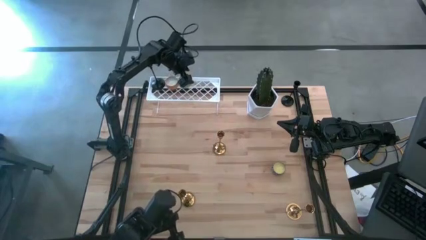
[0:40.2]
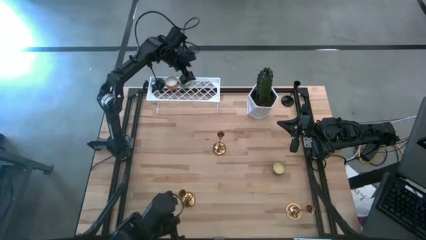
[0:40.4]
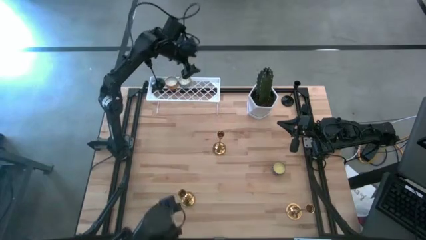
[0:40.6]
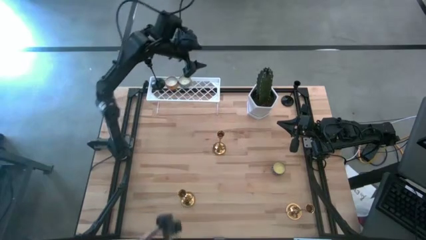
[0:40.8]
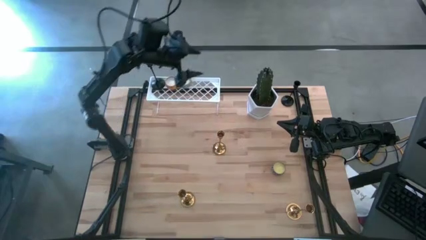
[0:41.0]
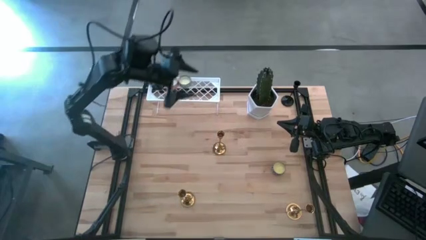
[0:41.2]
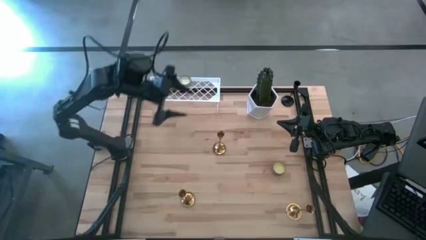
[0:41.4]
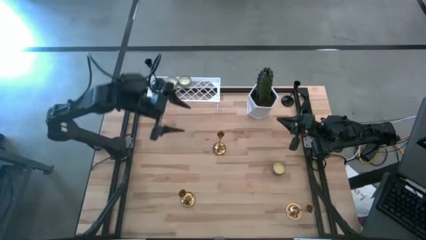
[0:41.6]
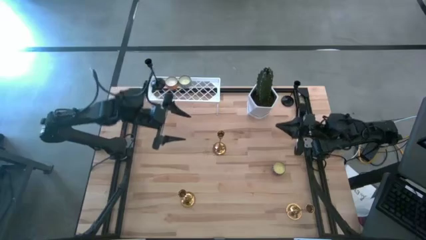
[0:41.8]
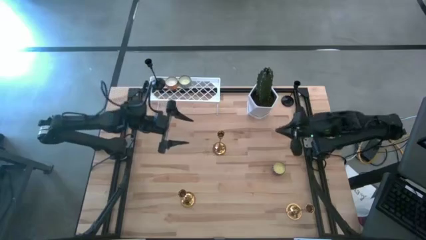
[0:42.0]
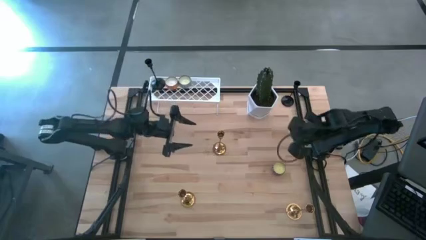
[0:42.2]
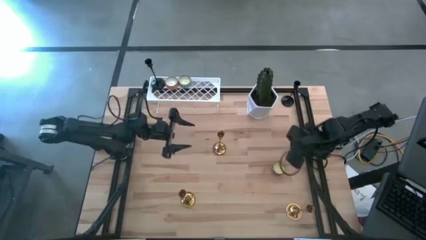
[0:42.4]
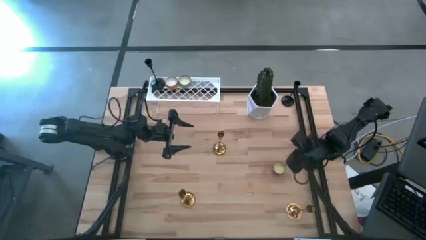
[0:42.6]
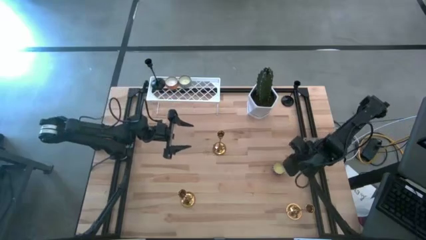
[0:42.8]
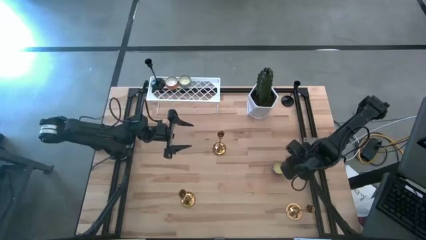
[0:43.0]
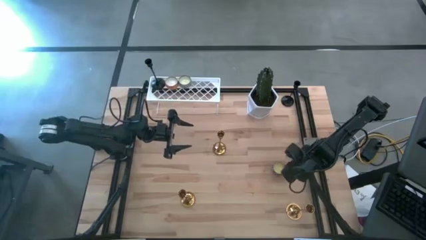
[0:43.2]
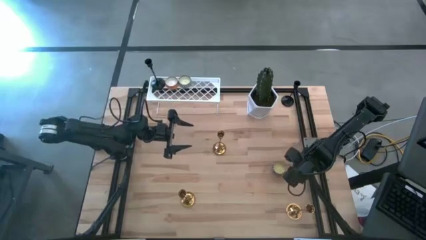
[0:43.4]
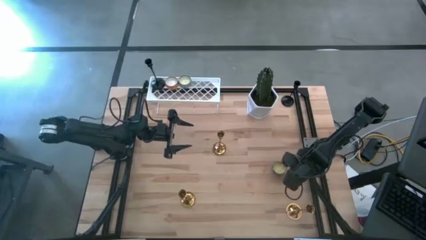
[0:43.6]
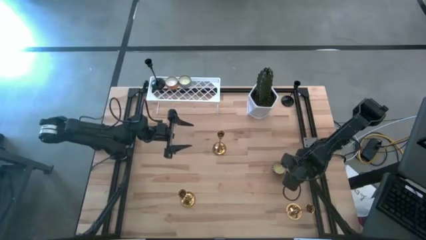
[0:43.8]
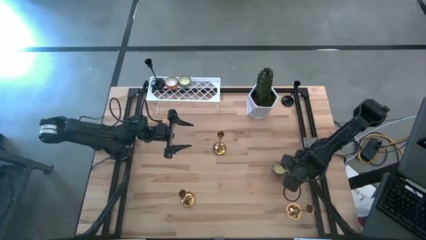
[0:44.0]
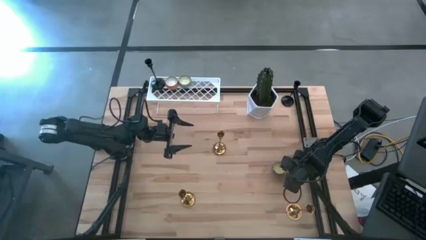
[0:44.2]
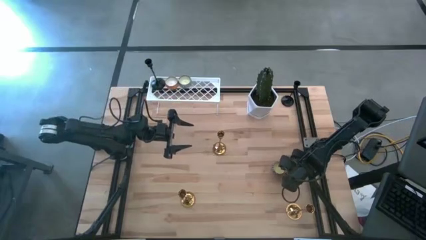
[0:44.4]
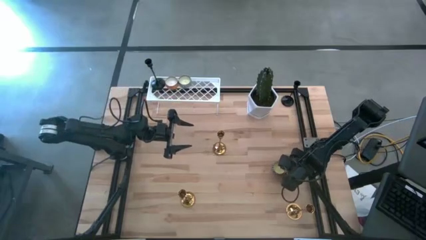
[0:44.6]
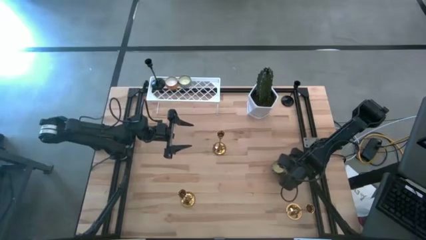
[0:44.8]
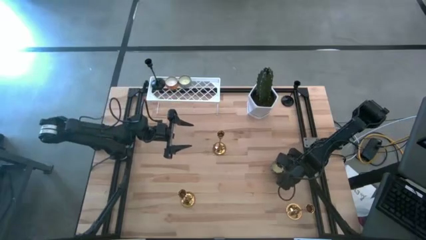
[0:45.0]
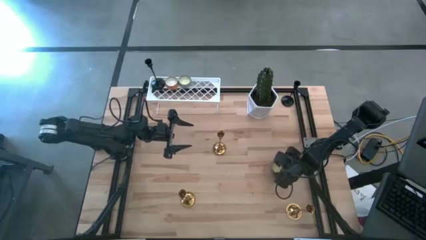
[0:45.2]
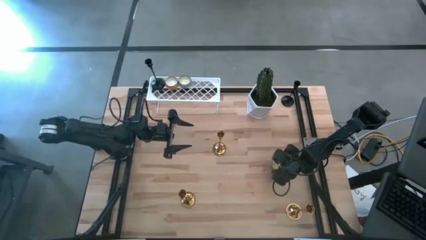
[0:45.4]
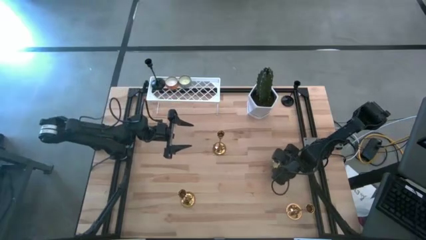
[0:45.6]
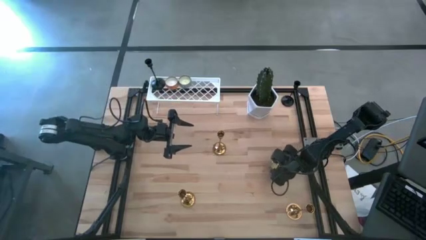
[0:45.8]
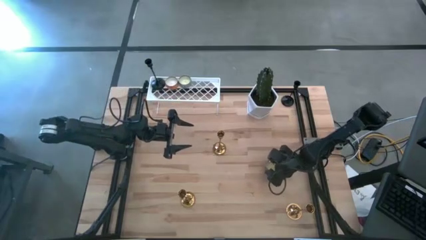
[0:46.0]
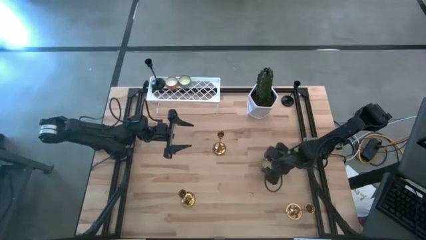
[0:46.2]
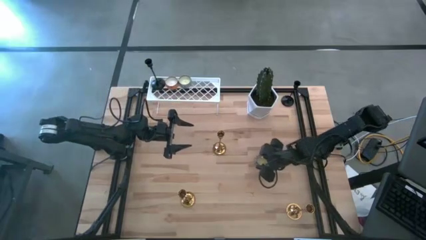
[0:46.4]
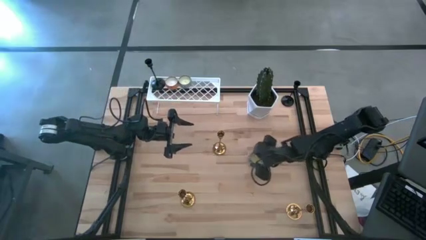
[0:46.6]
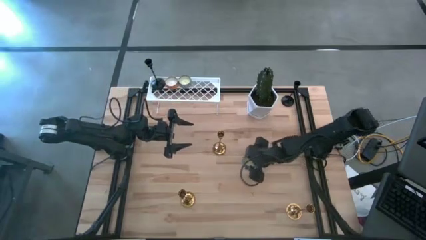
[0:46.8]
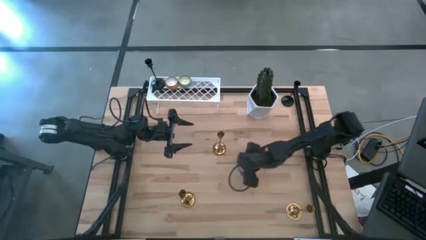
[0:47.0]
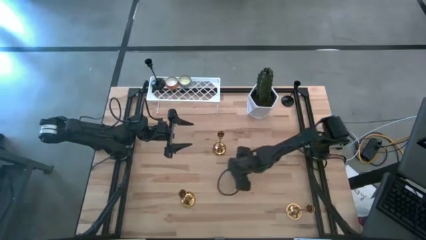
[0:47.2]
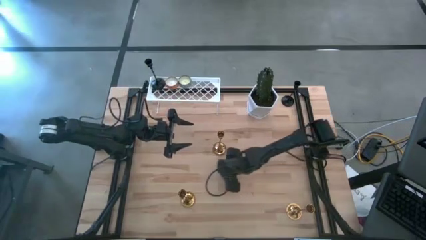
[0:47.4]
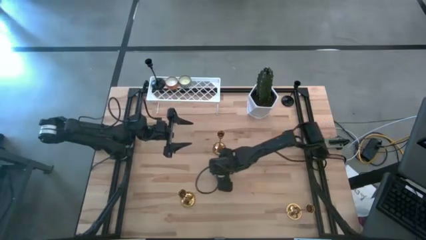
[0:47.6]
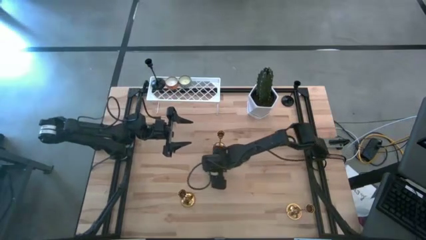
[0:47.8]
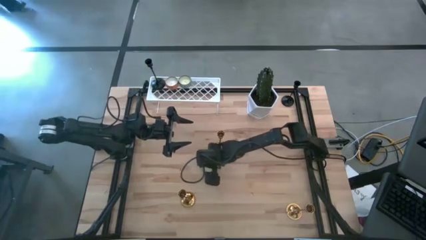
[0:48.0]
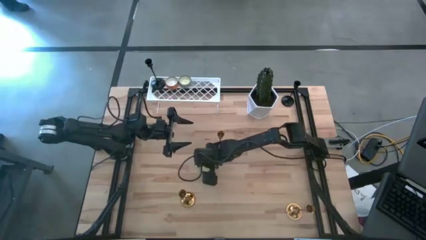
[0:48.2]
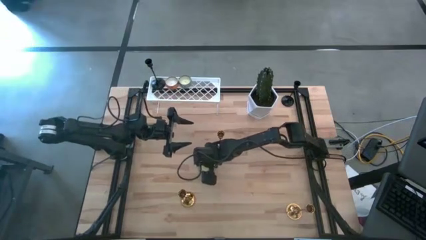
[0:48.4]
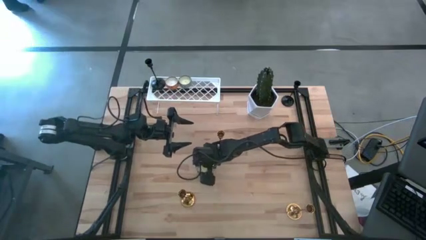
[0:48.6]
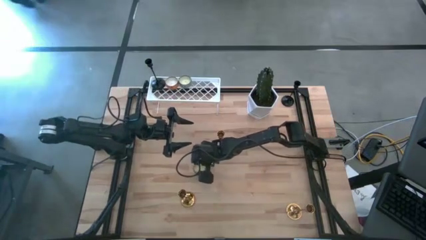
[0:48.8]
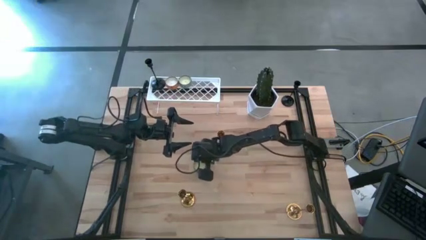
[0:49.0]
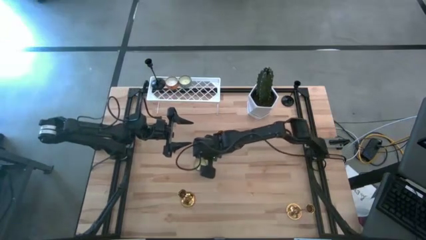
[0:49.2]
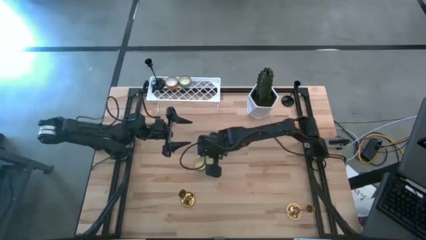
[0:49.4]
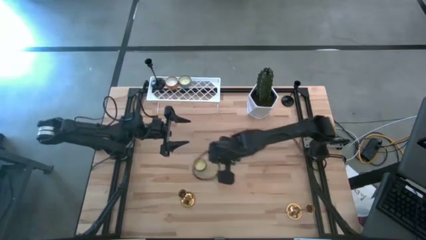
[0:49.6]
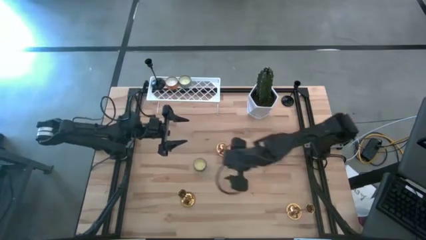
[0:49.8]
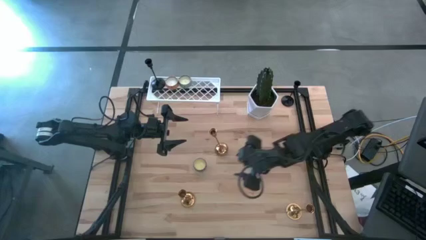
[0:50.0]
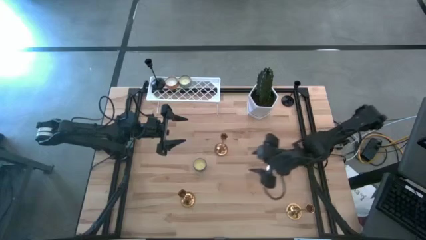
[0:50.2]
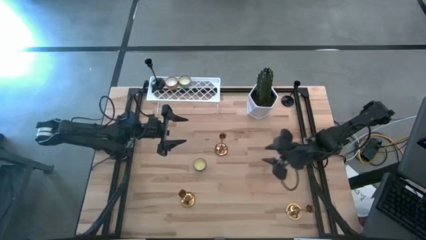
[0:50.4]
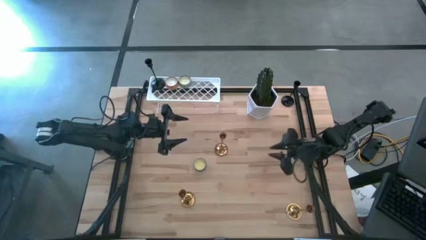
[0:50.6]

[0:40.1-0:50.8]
Task: Pick & Place candle stick holders
Put the red scented candle bottle on the shelf

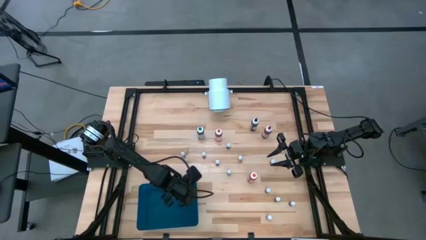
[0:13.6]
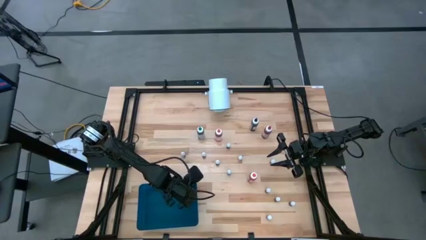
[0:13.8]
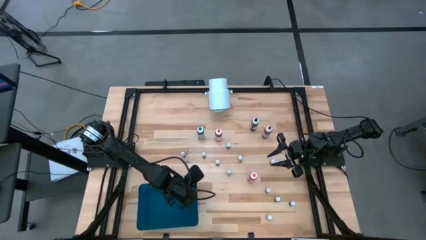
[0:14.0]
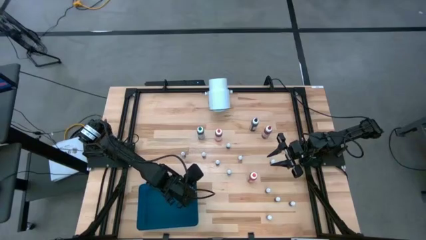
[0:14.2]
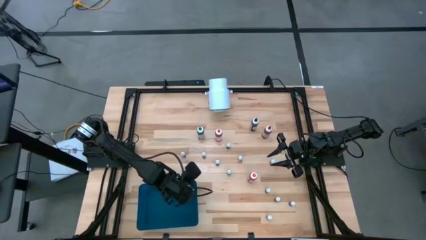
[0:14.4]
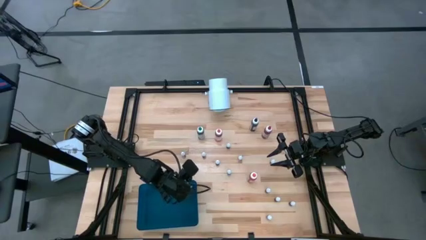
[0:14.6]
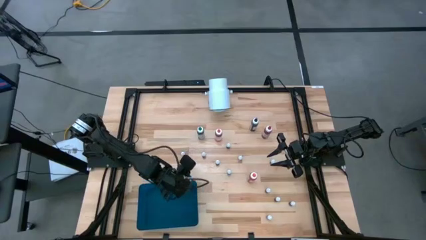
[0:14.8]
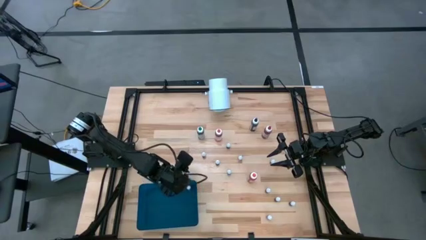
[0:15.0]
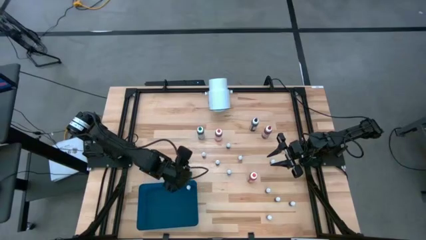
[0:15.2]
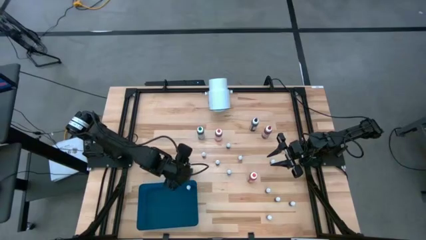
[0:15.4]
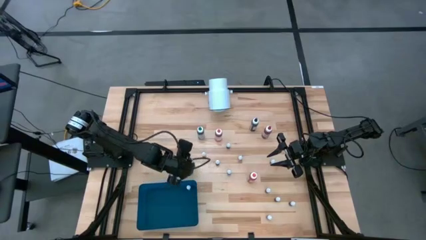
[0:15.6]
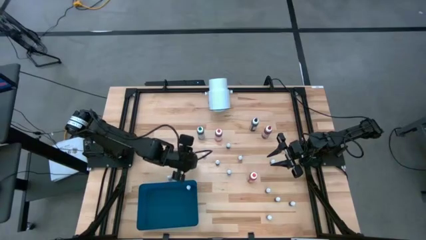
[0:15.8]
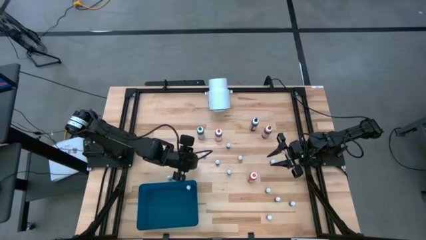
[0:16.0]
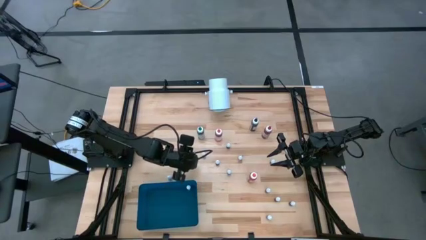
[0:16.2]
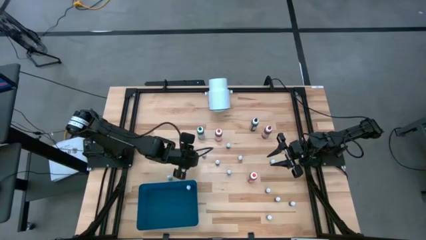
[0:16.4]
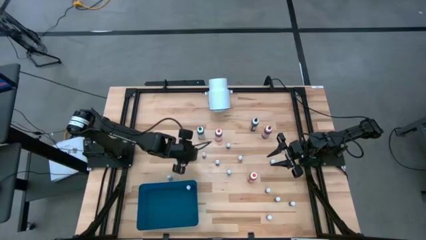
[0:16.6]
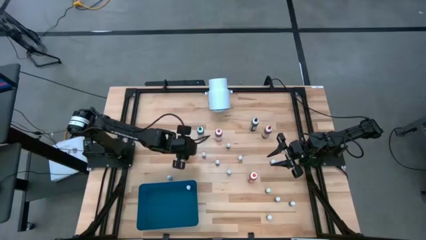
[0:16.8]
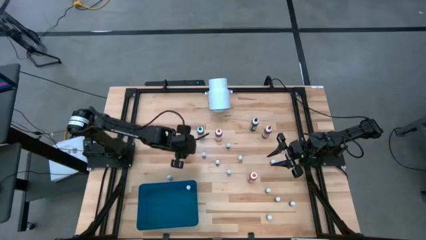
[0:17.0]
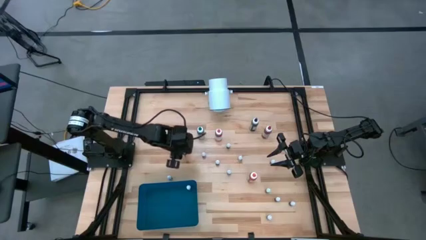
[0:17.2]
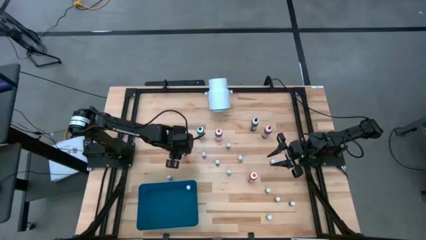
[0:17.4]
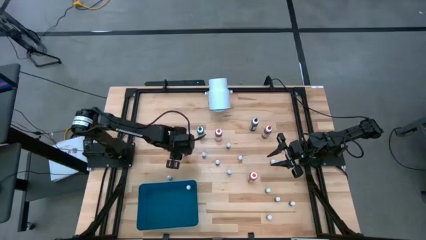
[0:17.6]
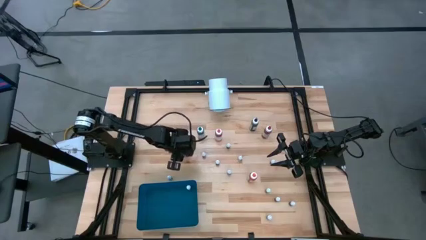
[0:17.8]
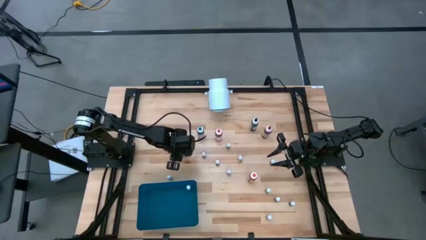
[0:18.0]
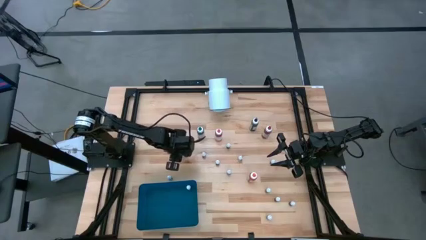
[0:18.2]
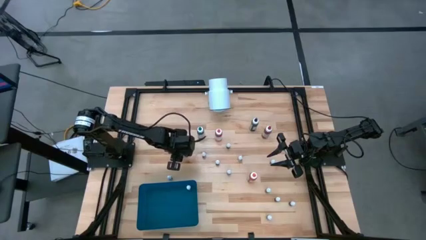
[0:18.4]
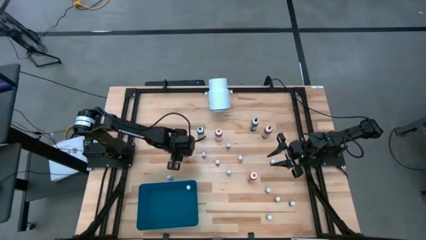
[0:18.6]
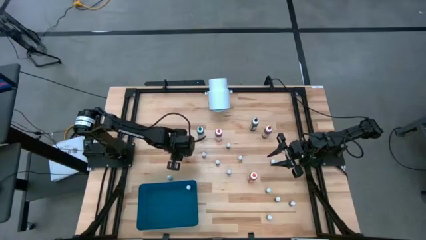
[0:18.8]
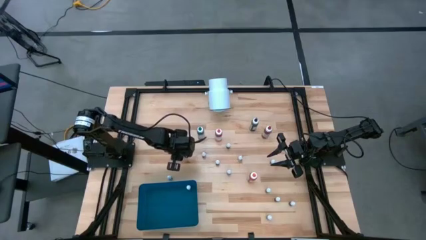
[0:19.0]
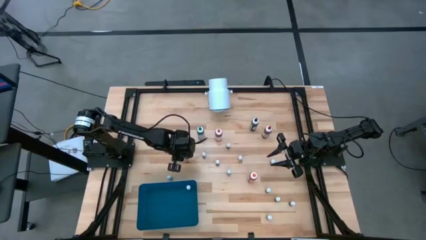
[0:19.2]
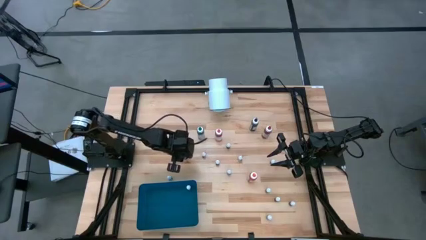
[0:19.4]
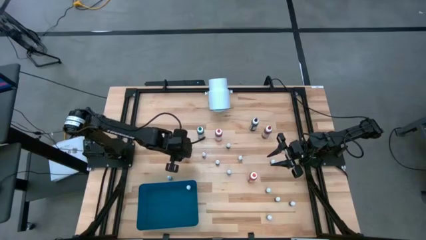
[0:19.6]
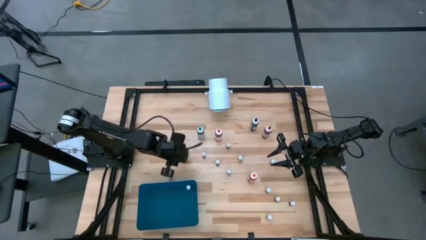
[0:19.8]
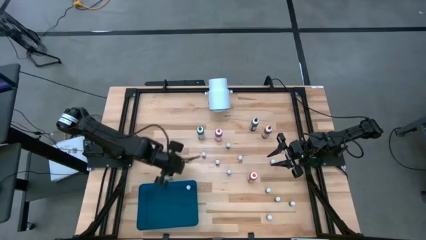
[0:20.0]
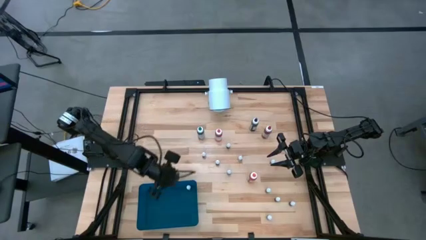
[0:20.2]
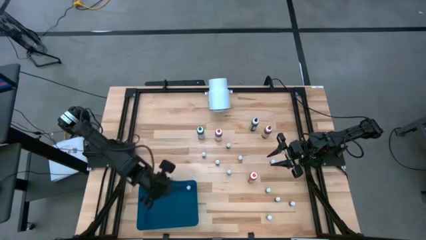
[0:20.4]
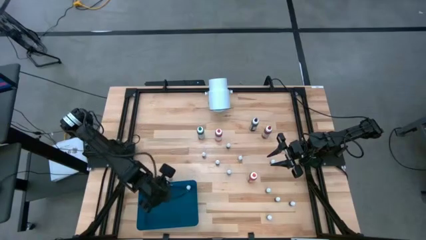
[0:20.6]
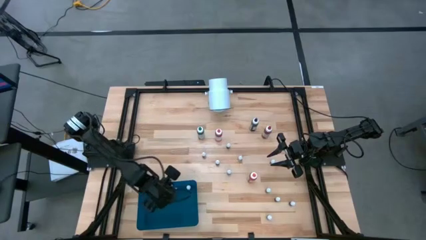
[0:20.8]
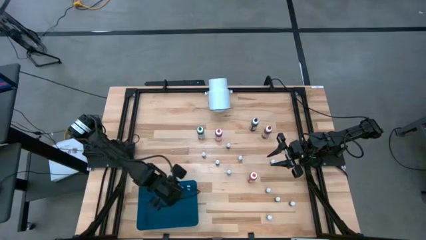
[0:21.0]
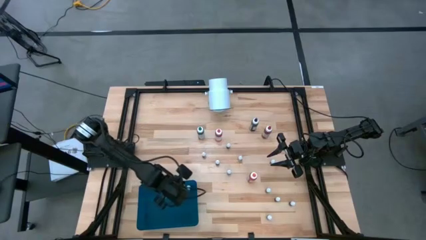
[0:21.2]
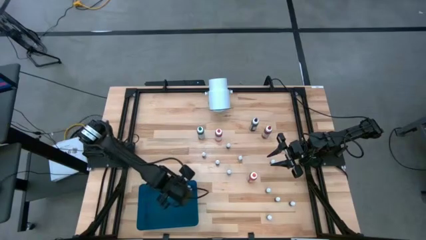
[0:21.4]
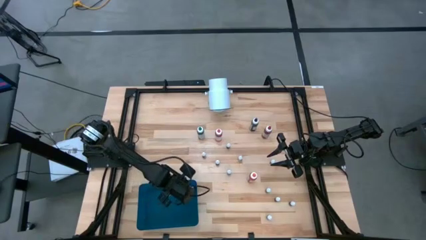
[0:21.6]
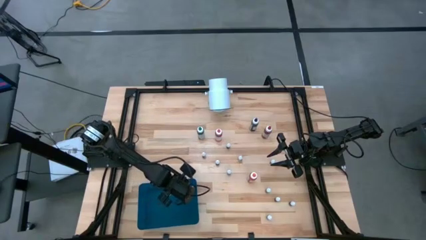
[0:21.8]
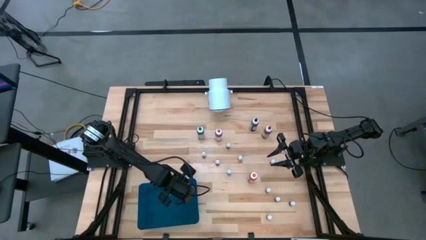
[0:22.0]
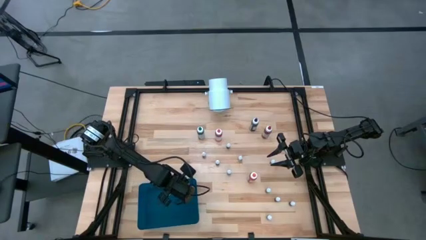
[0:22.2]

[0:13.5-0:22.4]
Task: Pick & Place food coloring
Put the small black food coloring bottle into the blue bin
